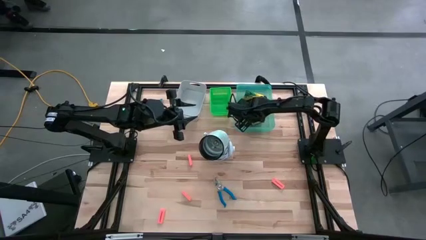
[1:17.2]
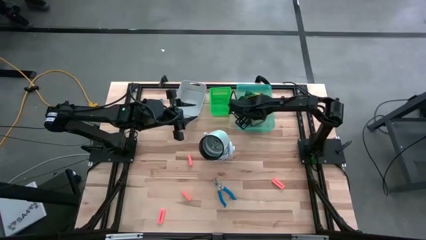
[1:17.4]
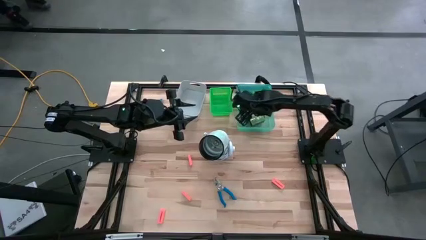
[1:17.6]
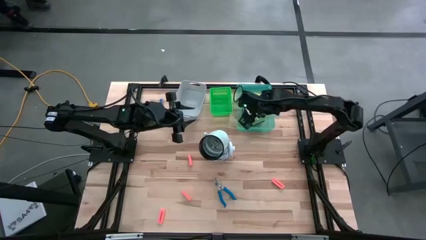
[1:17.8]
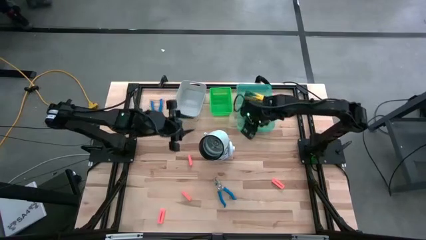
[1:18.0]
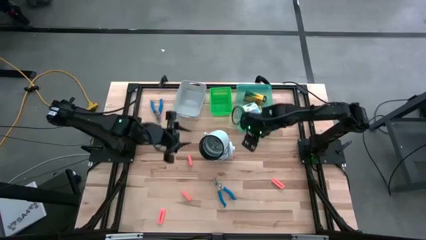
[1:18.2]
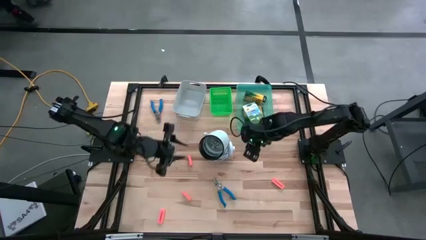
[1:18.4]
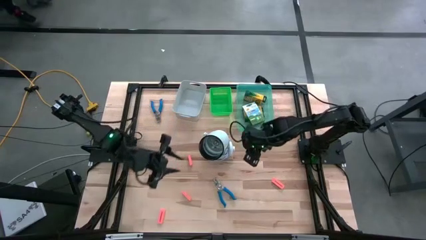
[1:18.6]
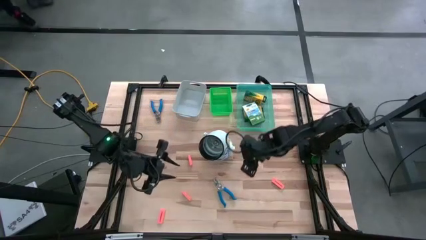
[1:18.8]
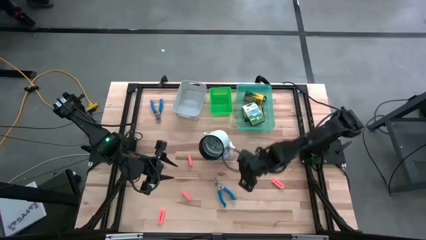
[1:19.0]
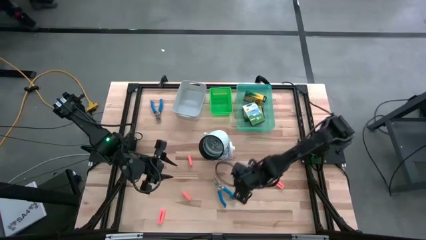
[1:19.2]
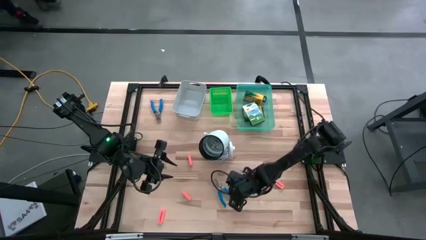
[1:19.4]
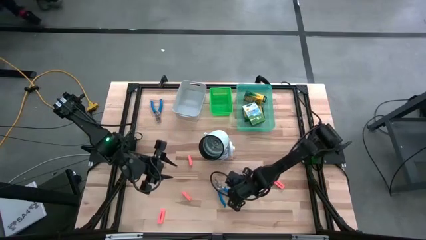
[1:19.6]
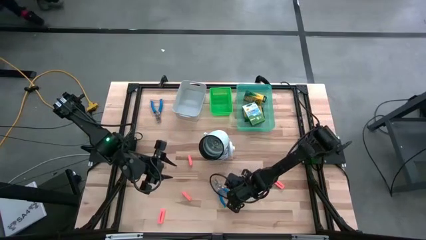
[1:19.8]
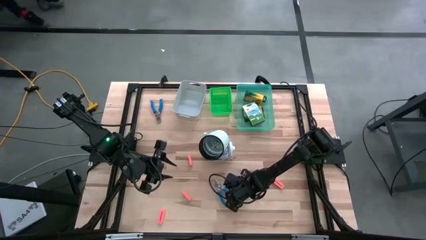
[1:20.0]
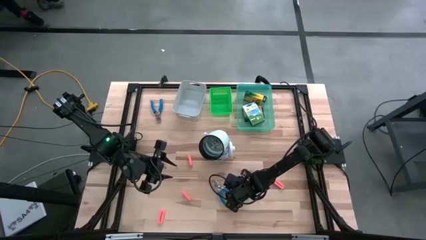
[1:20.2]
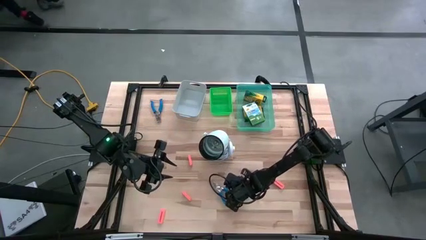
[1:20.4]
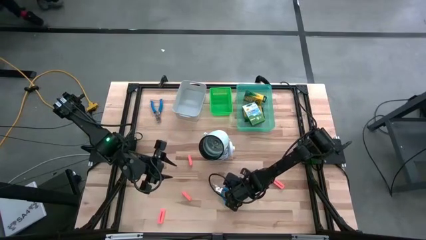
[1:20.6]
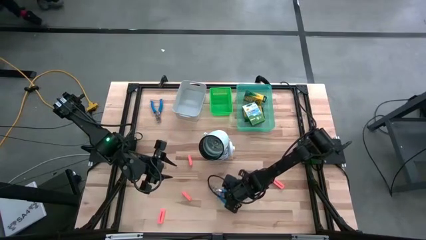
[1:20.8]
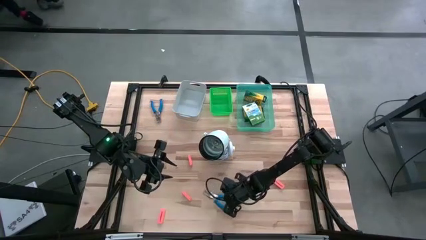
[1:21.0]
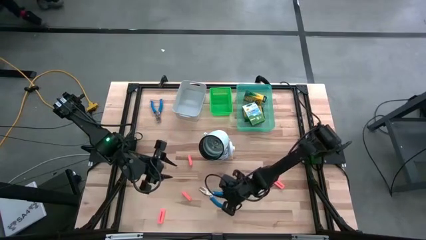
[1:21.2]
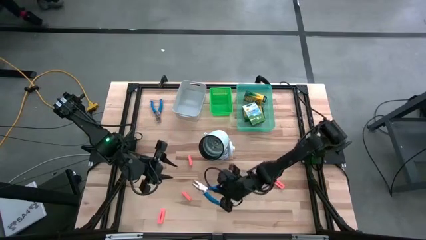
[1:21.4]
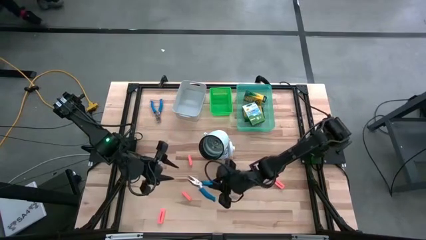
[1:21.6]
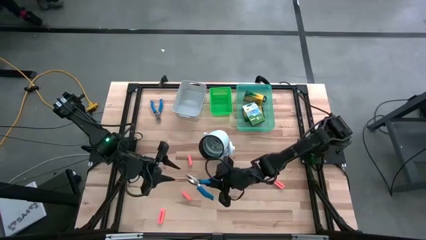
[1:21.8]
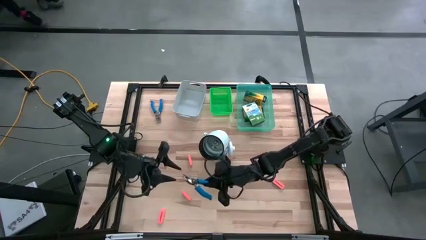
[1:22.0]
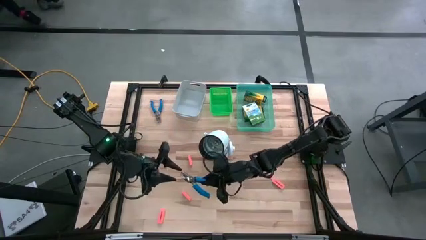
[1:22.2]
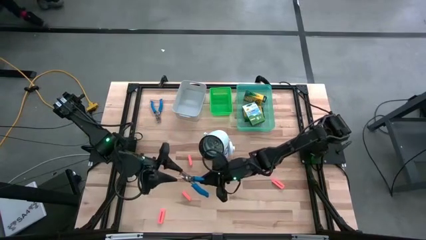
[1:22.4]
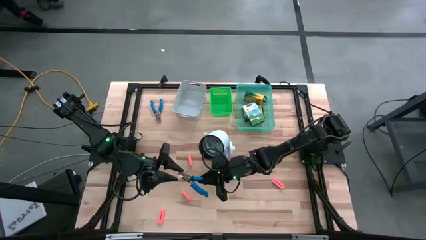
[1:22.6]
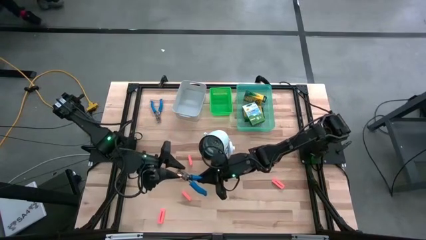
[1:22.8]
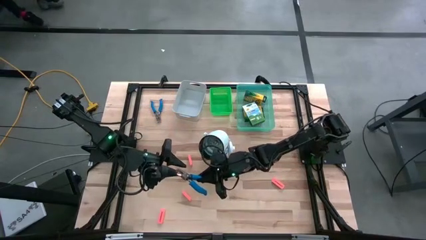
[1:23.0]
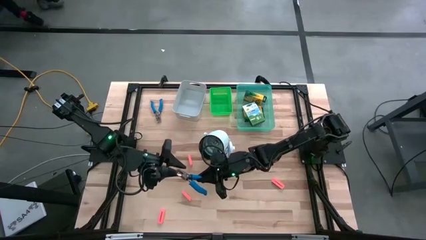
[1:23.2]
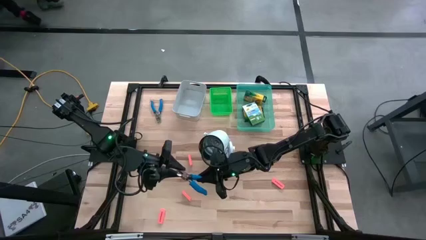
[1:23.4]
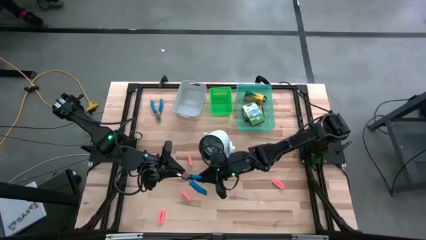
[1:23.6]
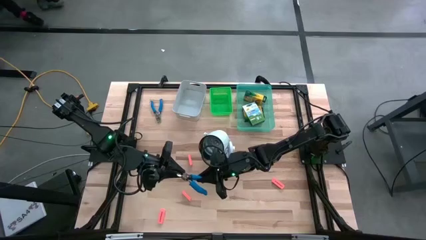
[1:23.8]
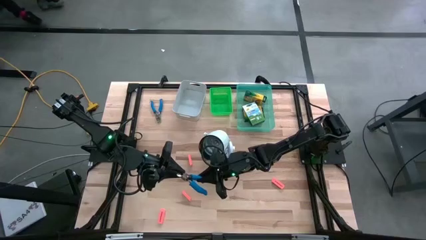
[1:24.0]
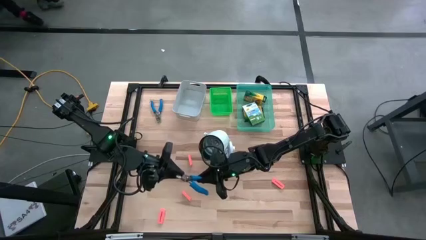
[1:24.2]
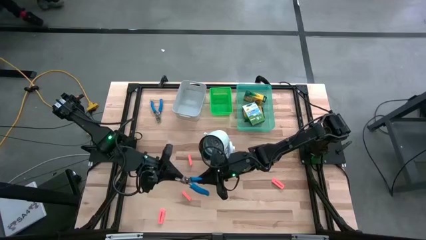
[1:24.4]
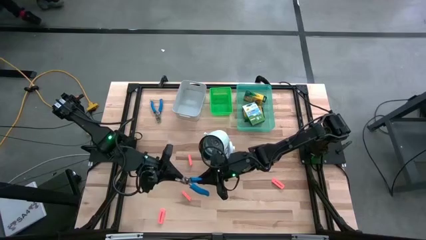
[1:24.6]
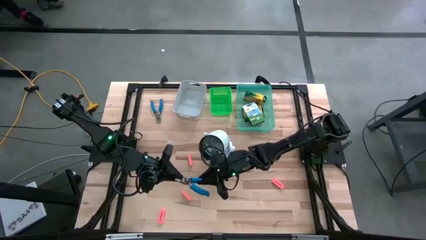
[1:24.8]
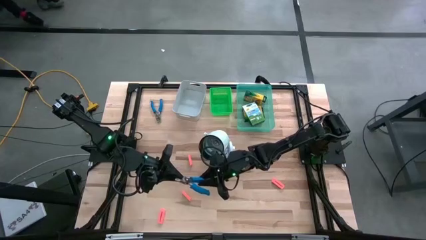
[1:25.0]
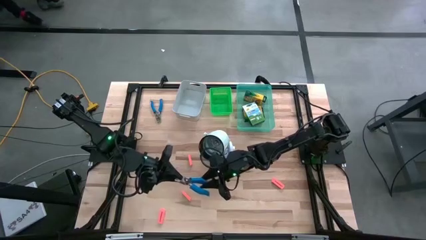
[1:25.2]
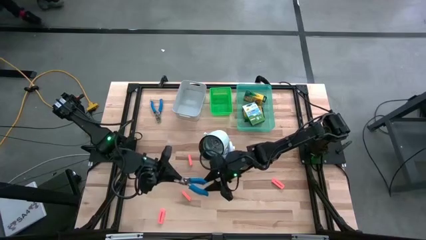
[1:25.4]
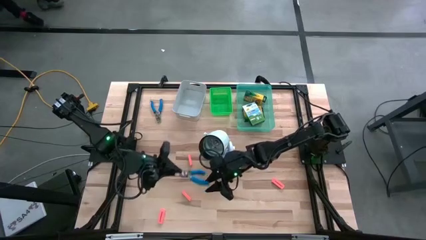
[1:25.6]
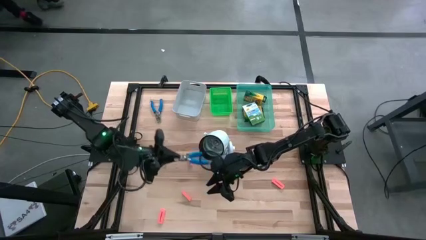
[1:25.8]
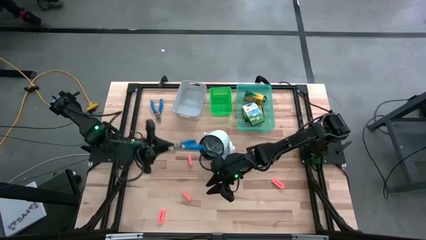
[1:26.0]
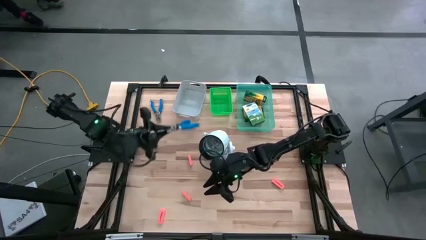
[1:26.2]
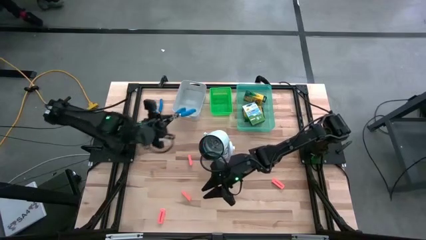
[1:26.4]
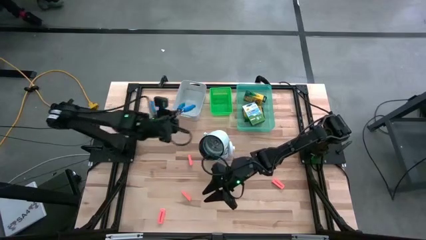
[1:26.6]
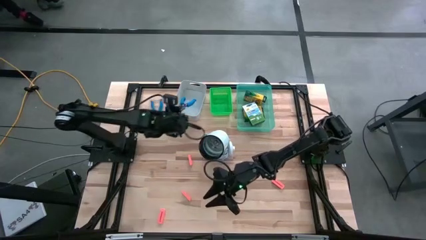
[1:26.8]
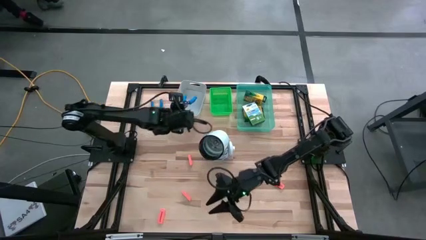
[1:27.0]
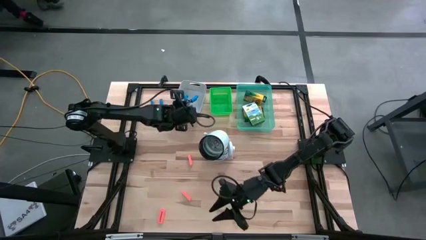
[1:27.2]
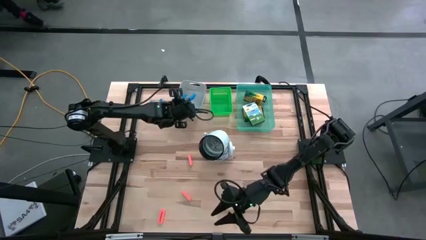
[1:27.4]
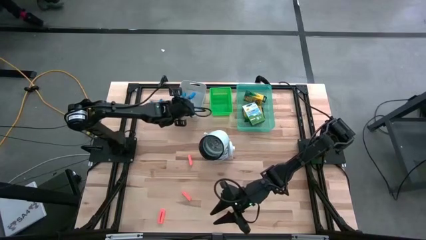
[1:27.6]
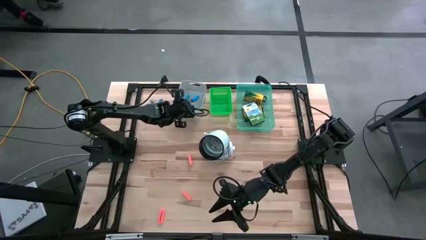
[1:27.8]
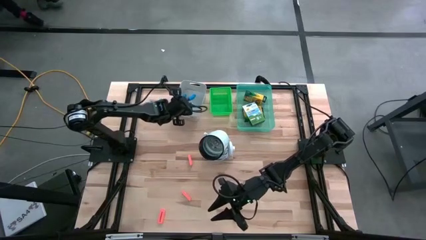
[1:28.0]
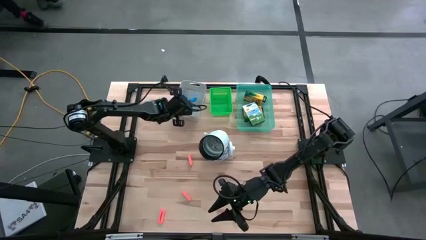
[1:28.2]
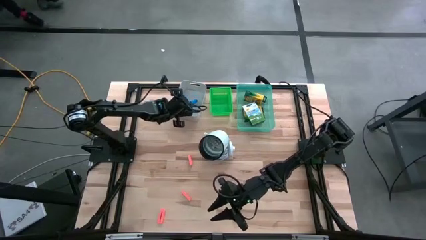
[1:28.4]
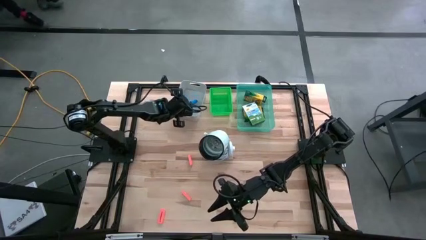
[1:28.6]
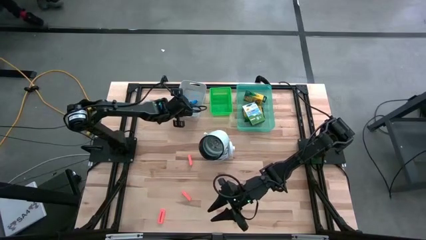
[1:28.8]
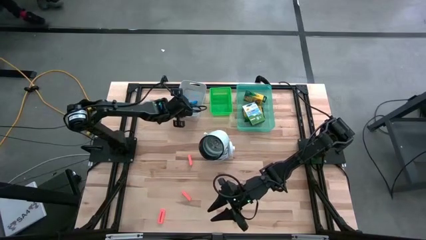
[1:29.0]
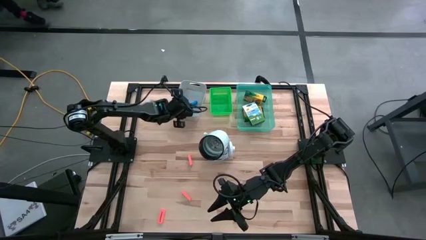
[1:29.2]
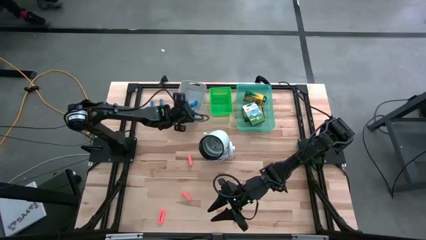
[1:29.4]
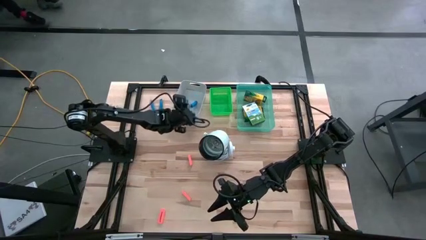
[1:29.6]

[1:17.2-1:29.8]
Task: Pick & Place School Supplies
Put the blue hole puncher into the gray bin

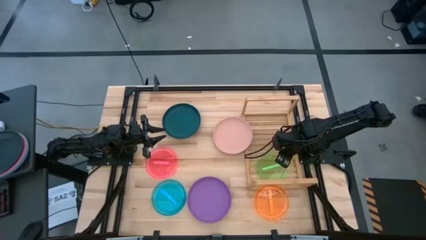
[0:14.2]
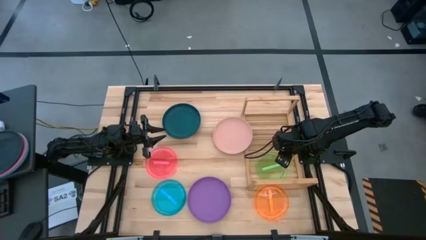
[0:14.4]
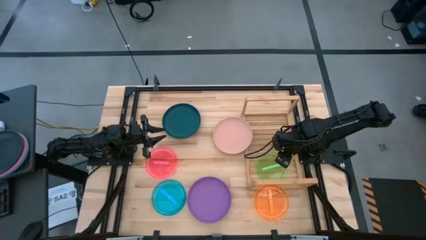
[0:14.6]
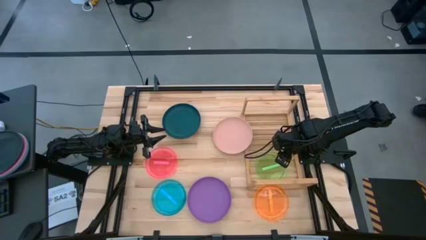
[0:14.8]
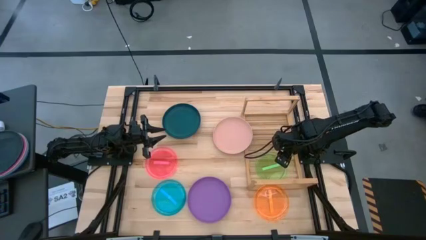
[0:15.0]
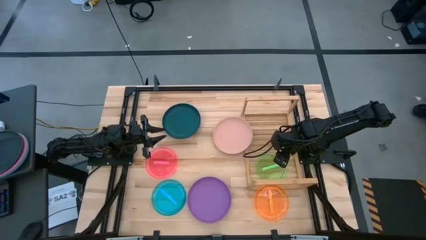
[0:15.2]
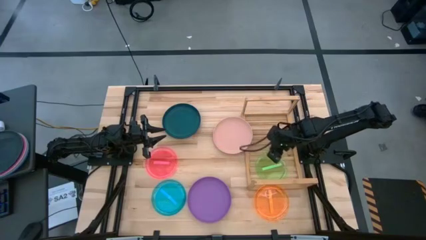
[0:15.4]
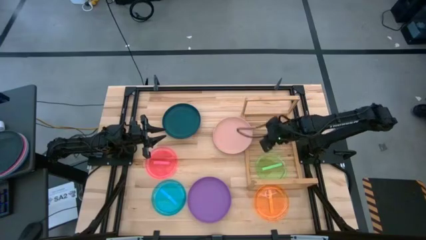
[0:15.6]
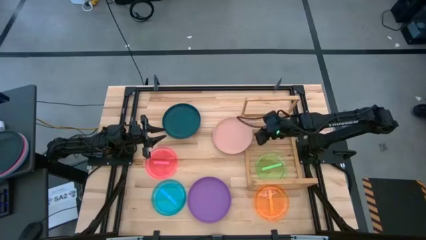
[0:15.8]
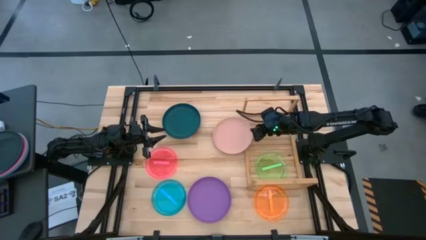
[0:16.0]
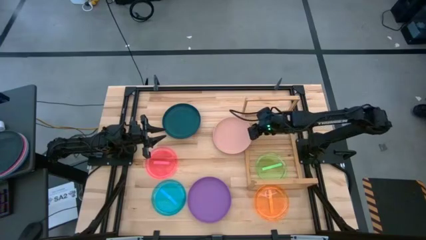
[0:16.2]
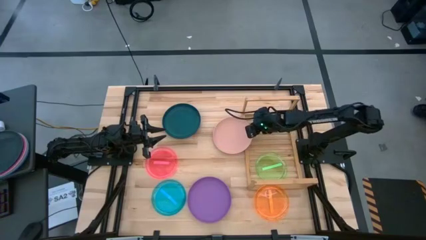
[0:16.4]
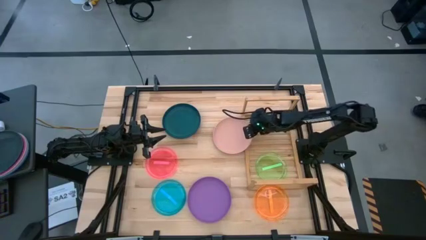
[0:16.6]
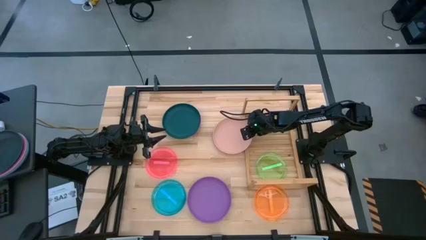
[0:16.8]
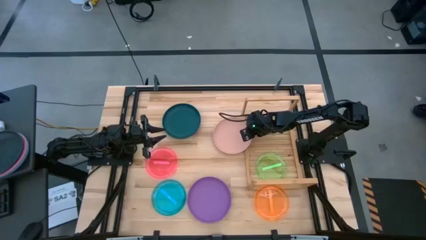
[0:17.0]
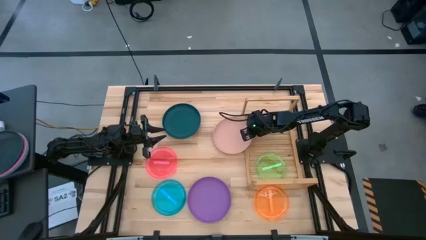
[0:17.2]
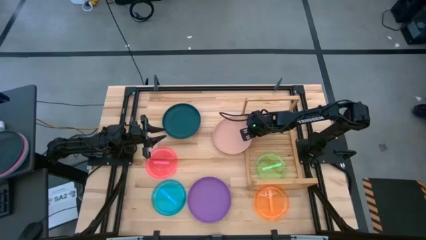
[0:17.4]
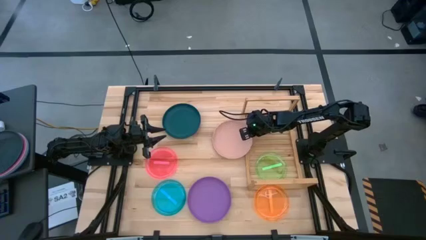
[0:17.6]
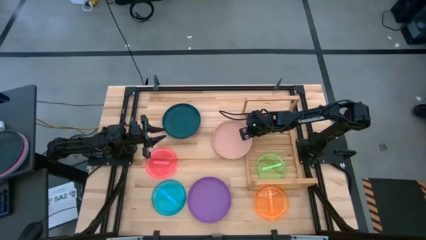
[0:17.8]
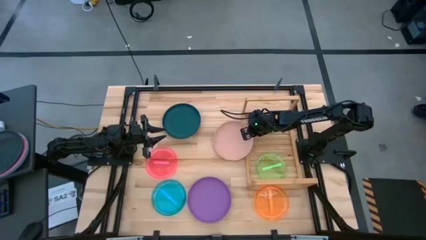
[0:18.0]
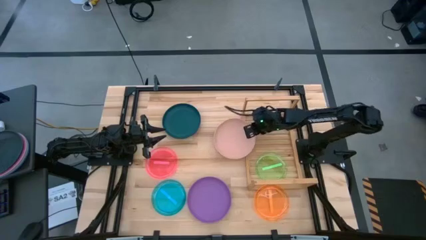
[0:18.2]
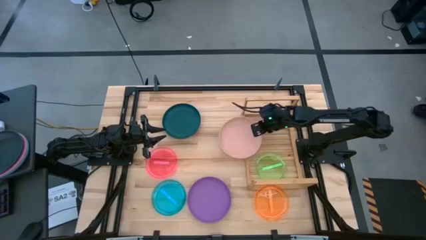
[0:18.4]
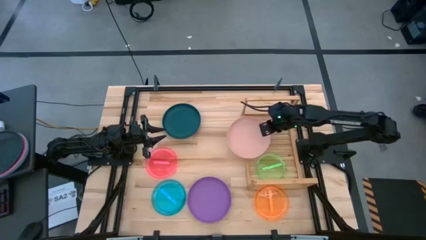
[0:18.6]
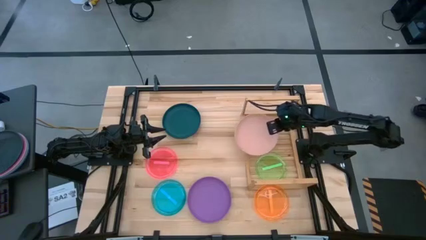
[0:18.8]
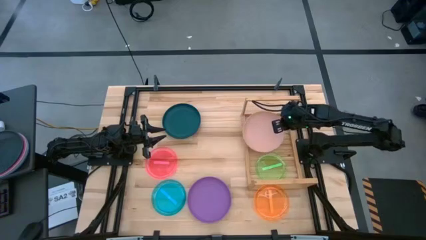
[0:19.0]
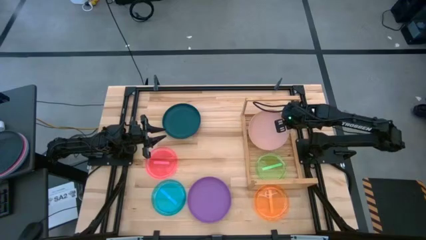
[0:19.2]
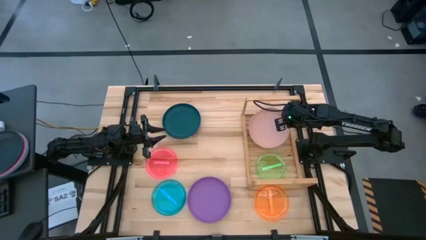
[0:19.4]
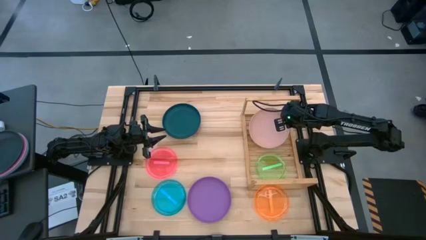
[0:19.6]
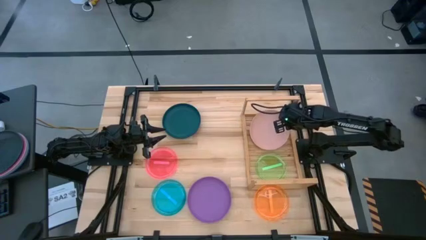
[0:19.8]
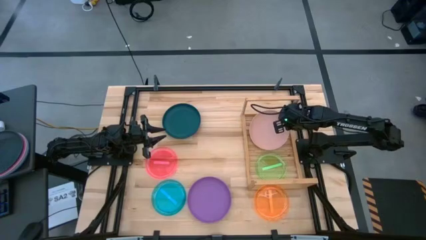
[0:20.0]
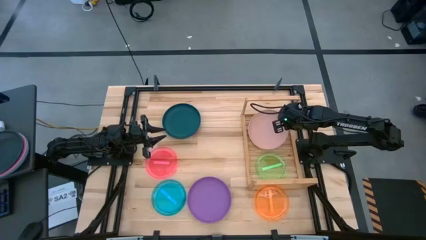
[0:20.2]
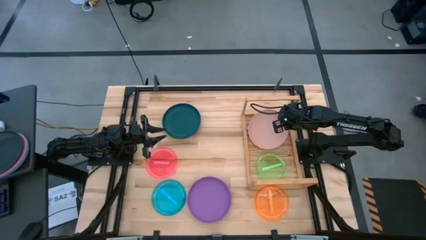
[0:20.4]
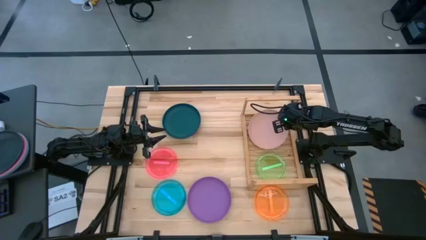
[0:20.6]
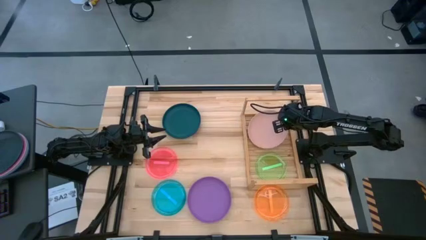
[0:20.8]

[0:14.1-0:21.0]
Task: Place and stack plates onto a shelf
Put the brown plate on the shelf
